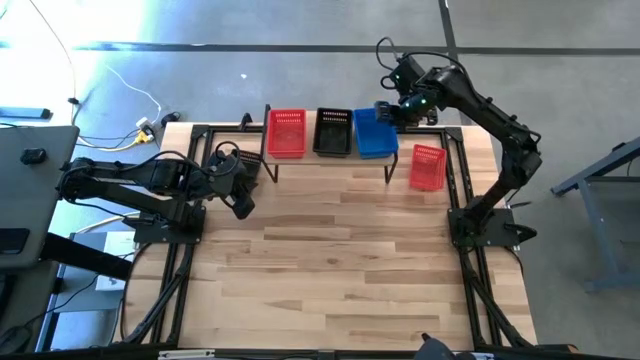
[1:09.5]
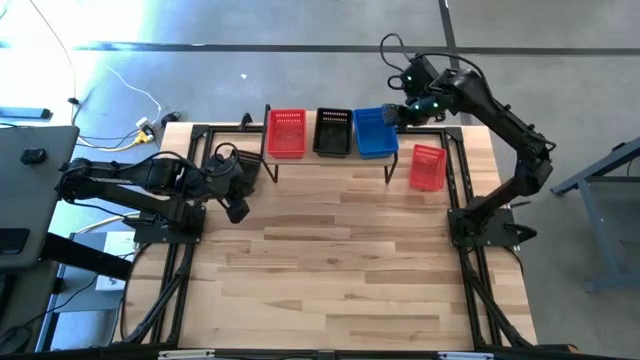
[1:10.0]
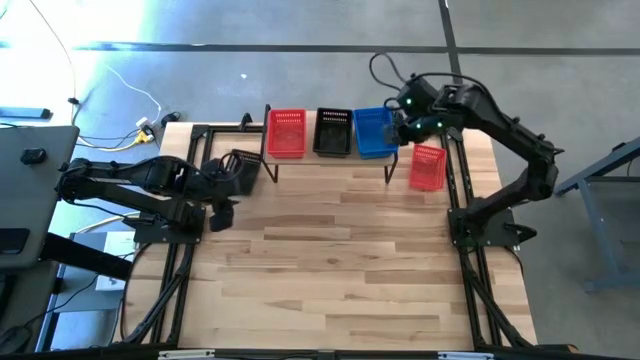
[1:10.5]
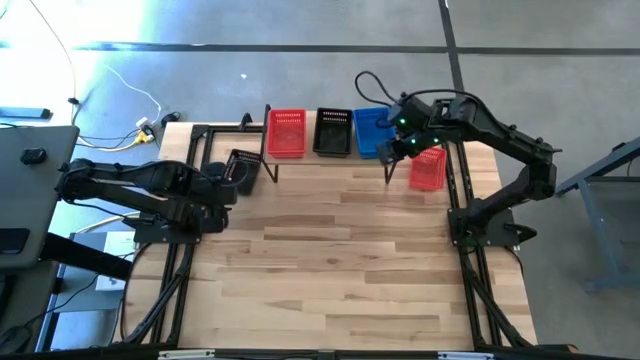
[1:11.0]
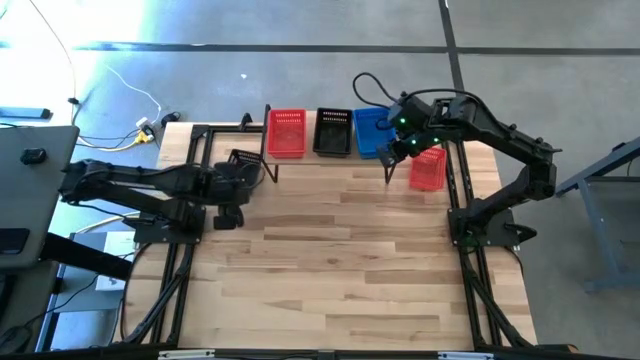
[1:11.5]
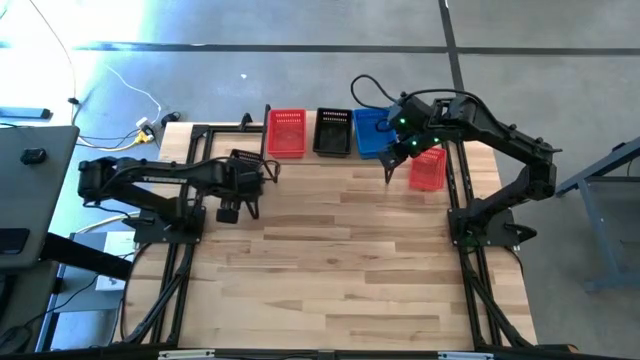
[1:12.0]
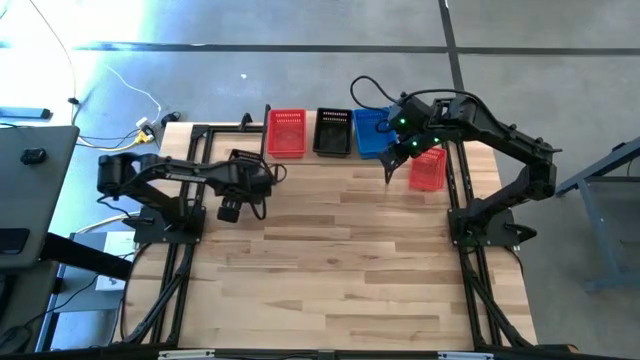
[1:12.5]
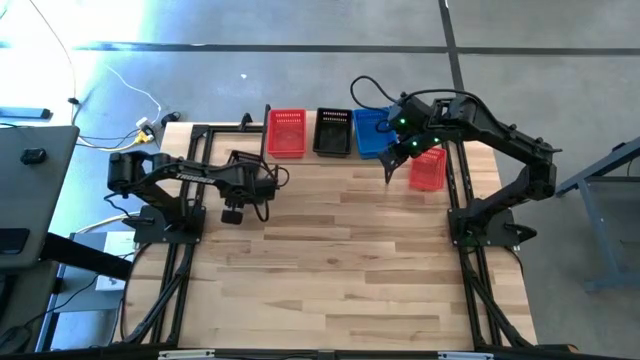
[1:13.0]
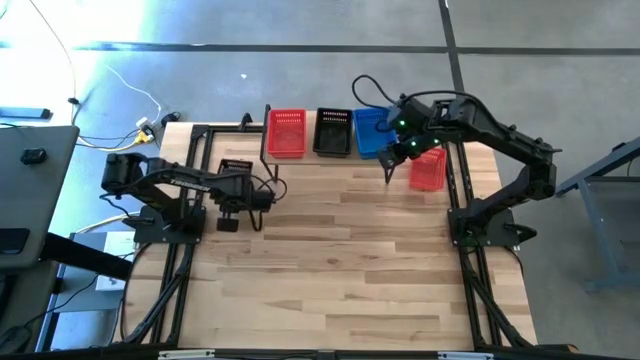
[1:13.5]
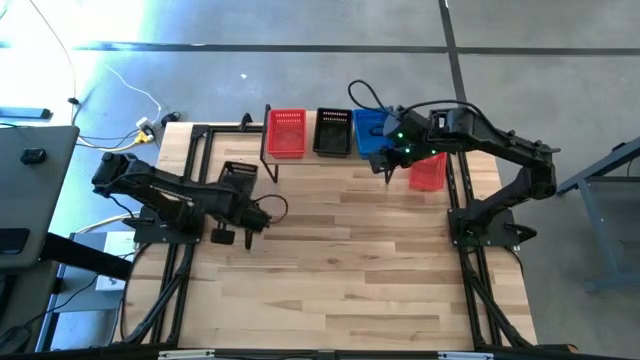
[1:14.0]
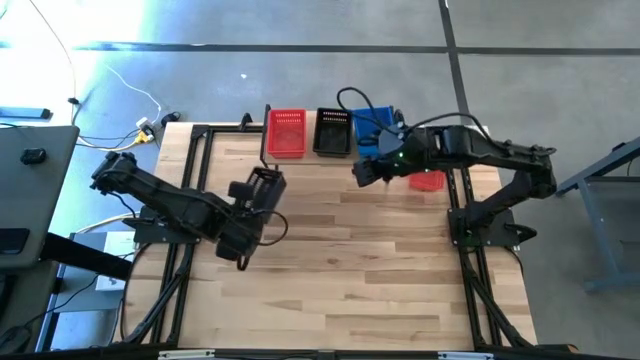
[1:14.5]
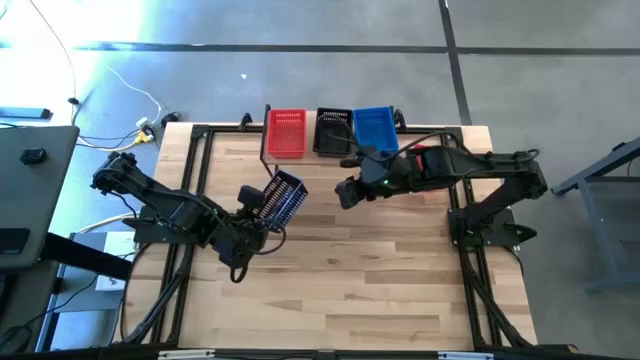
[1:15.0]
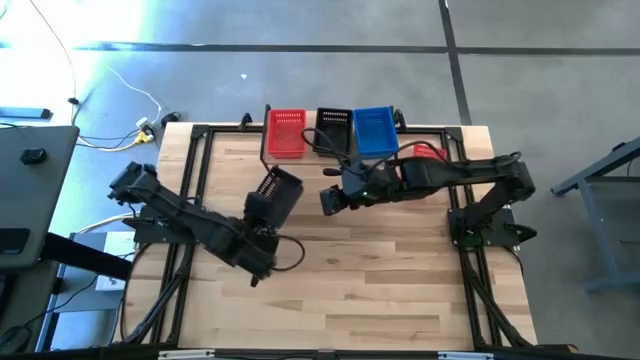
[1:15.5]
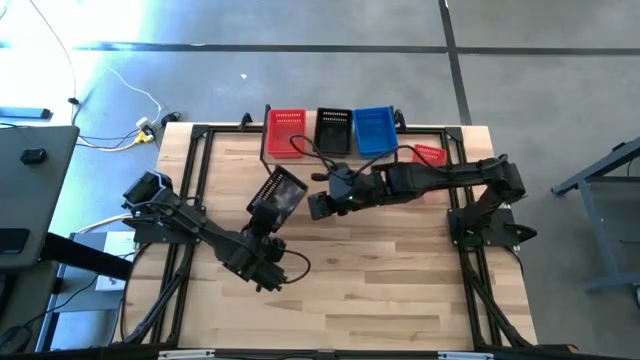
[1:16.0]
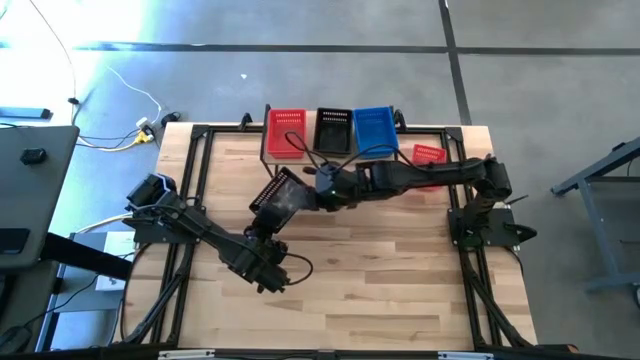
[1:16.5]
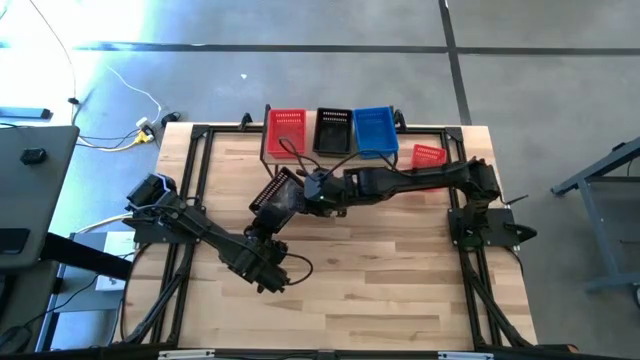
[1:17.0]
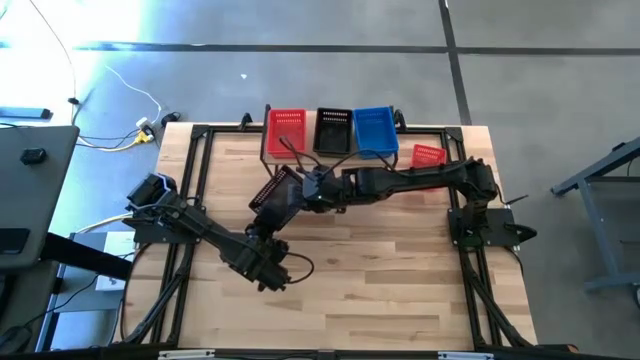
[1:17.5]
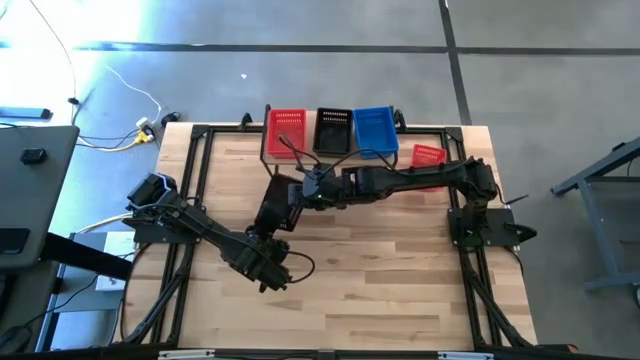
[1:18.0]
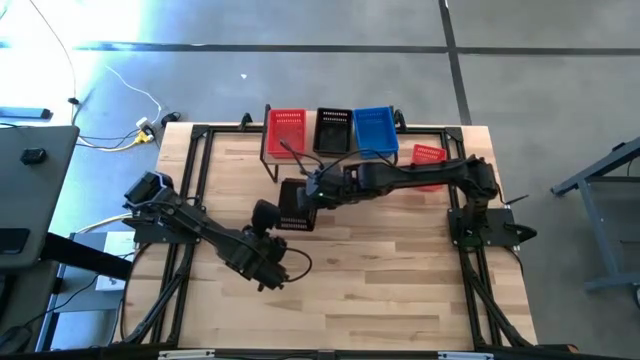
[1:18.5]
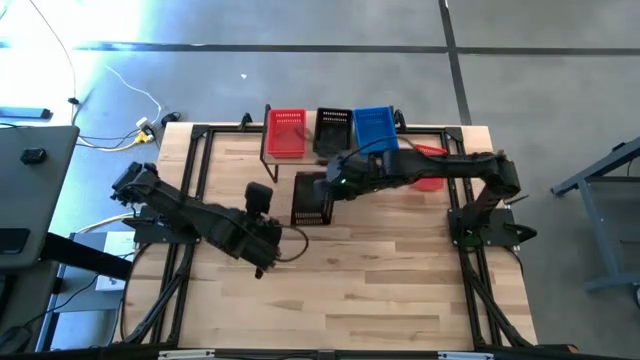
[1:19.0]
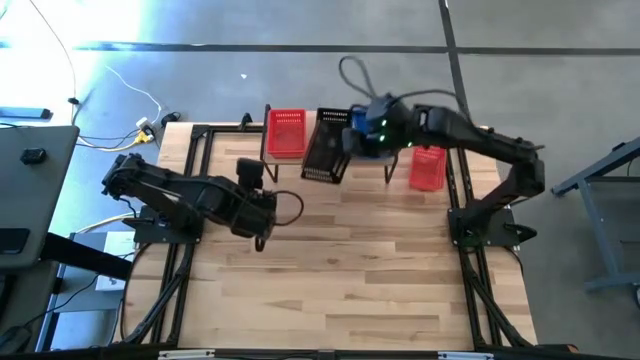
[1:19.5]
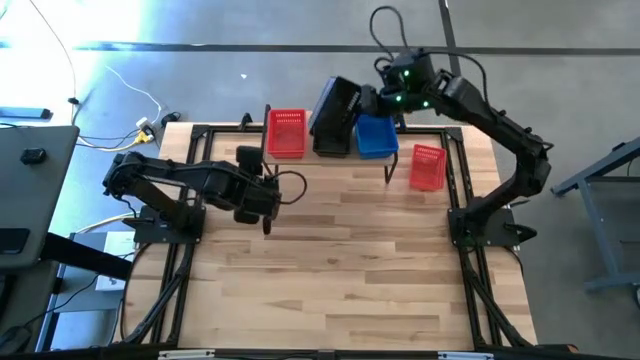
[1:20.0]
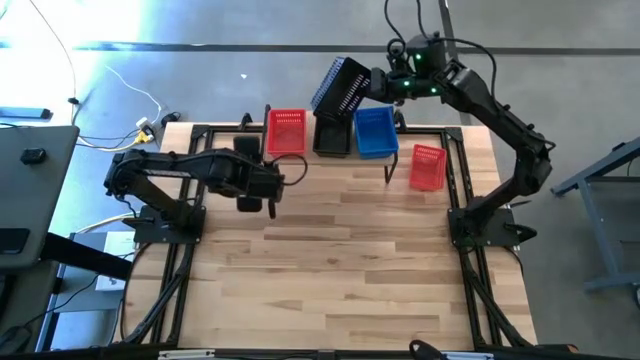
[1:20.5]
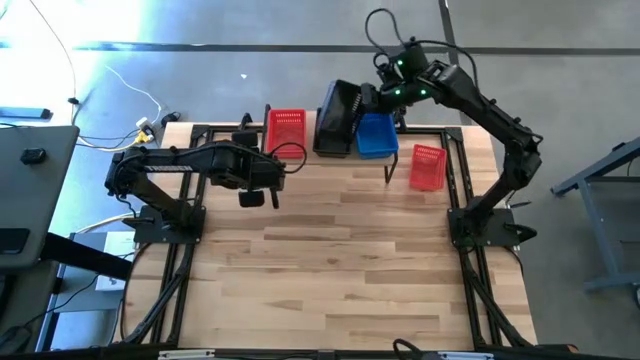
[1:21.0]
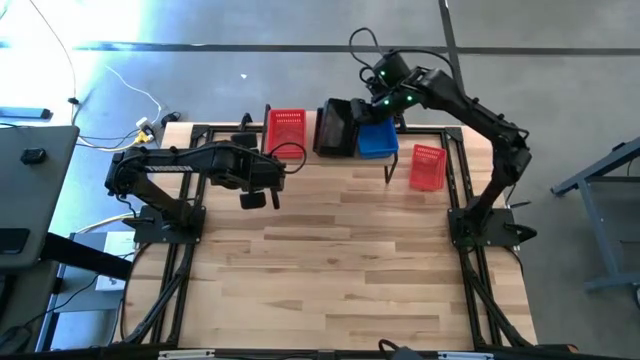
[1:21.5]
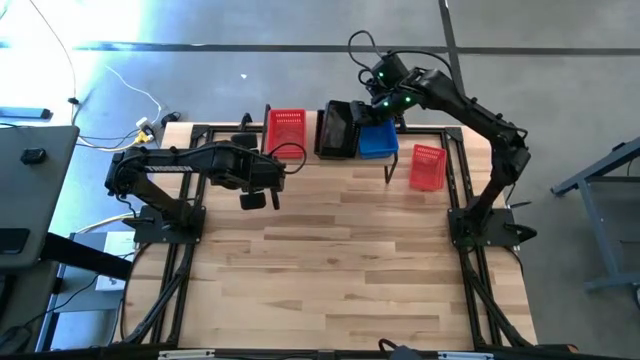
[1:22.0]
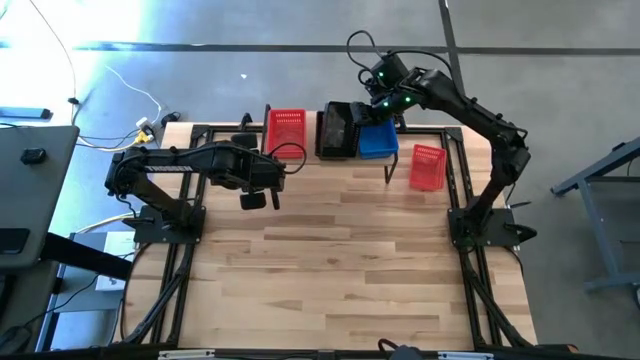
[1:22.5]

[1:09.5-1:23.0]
Task: Stack baskets on shelf by color
Stack the black bin on top of the stacked black bins on the shelf

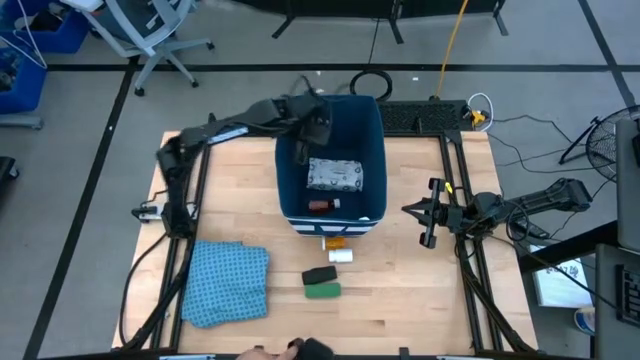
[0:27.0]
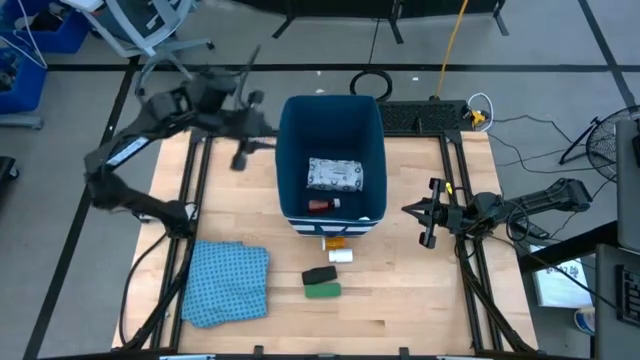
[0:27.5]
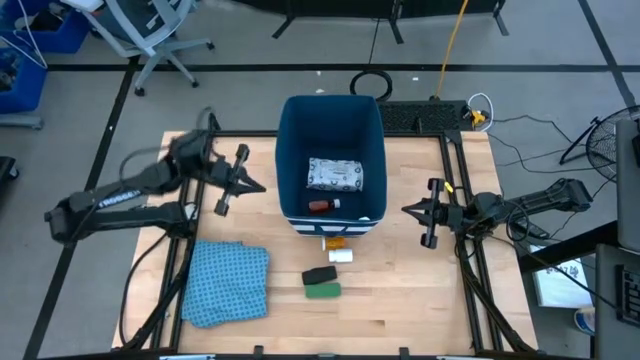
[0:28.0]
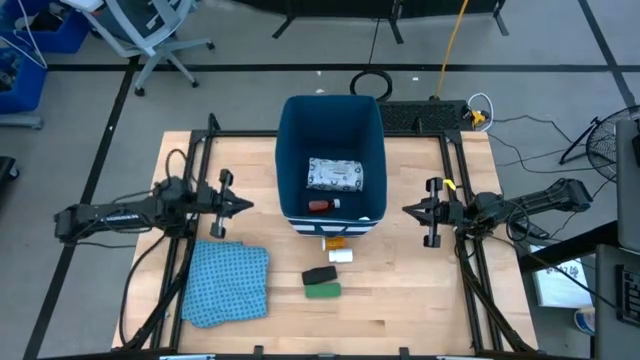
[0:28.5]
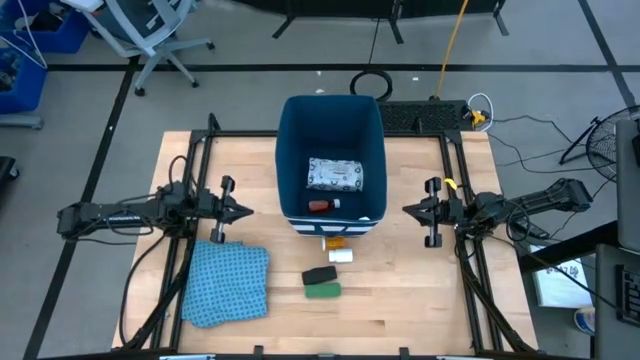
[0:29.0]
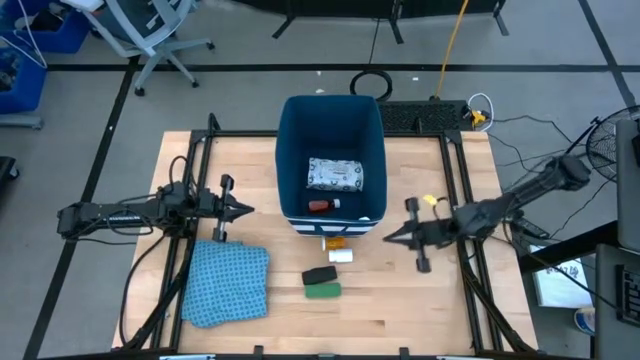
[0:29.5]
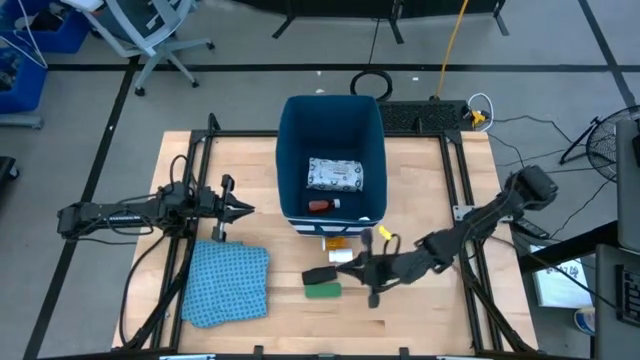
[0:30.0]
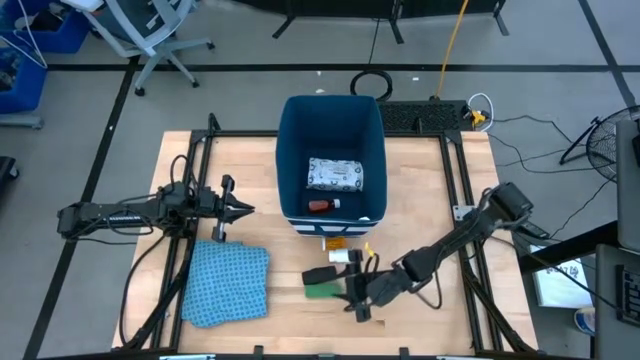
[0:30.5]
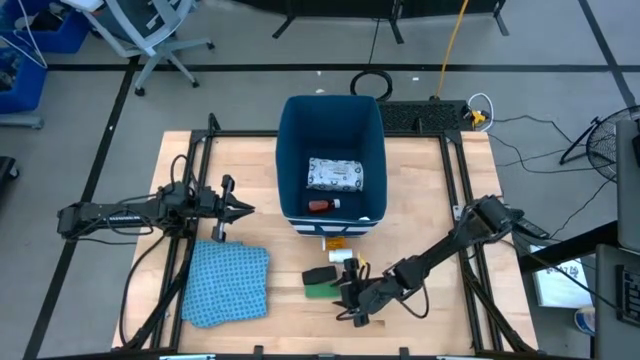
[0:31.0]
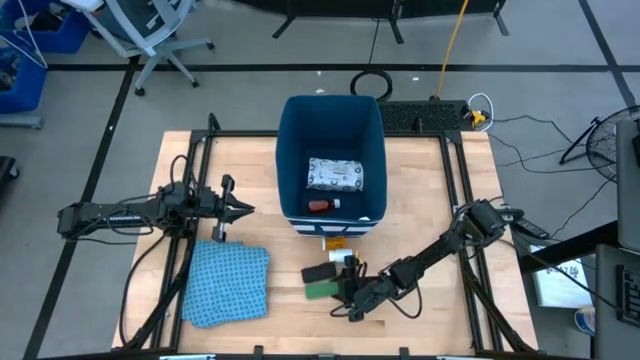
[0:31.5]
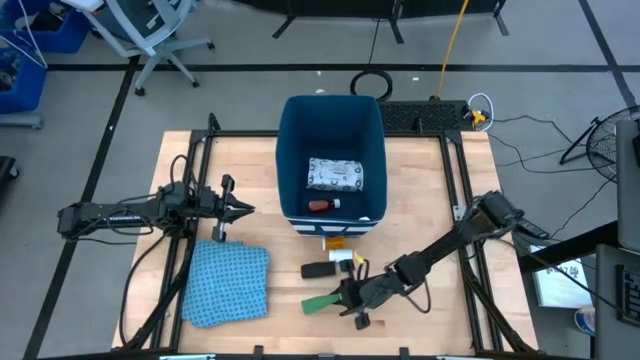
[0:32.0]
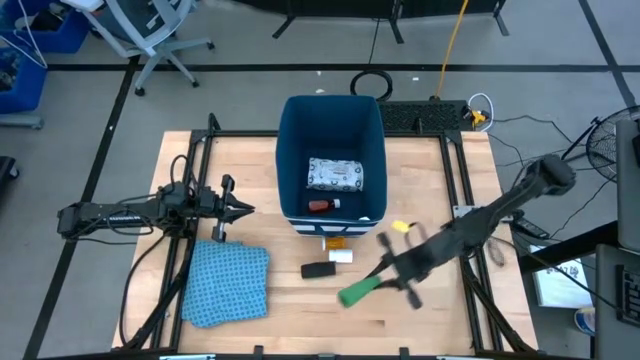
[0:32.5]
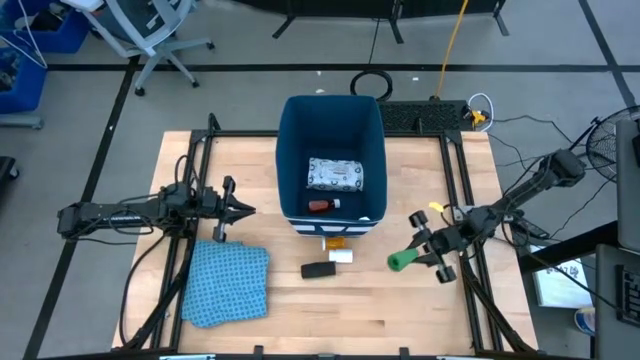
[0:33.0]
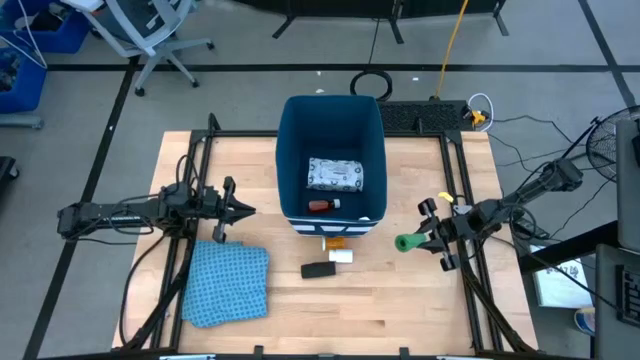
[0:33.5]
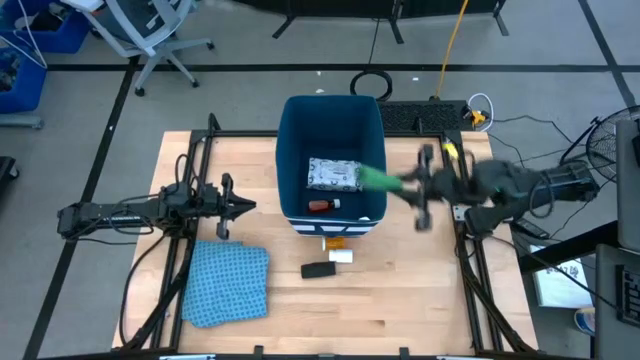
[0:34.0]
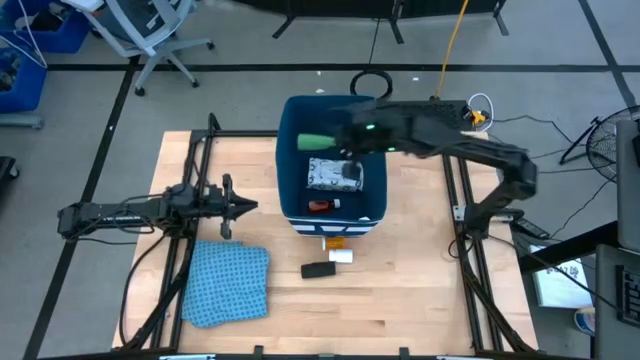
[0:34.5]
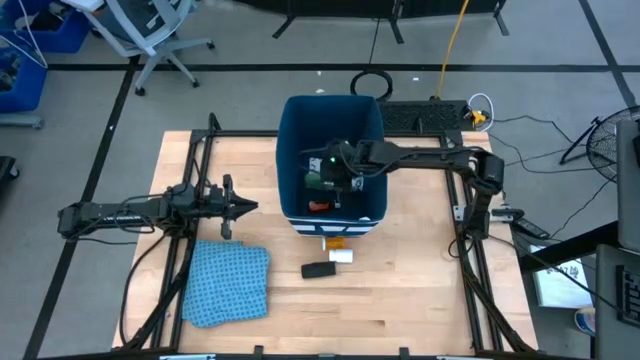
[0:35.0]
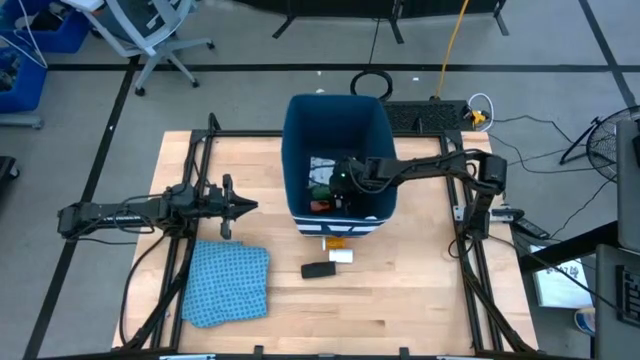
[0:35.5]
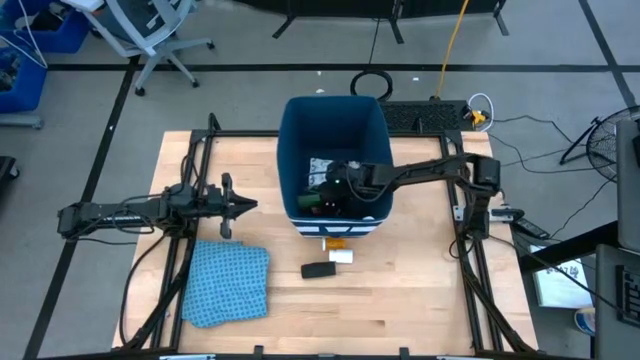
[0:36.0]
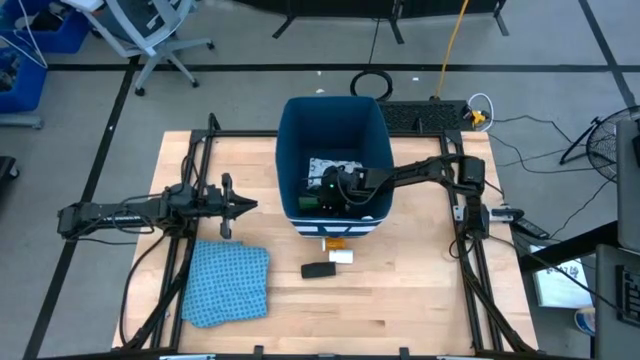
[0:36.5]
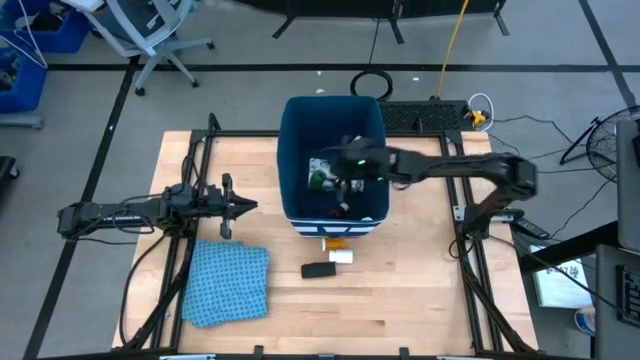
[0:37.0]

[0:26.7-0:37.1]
Task: Pick & place medical supplies in basket/bin
Put the green bandage into the blue bin
